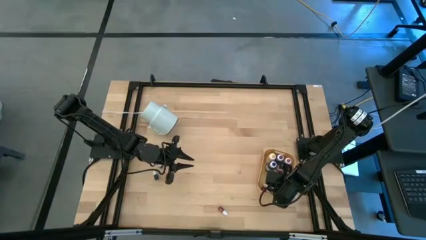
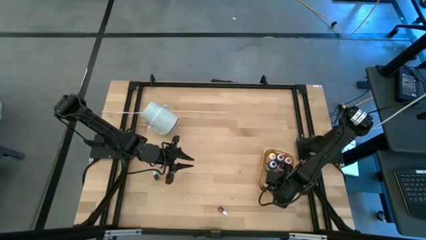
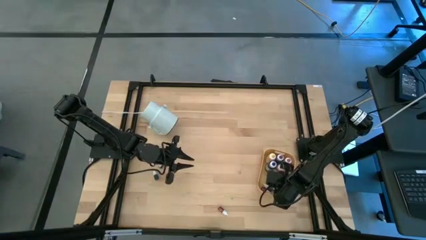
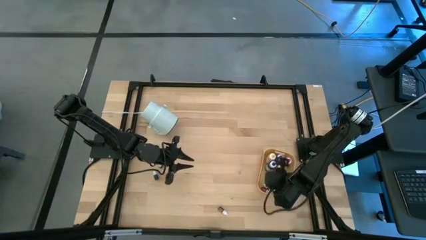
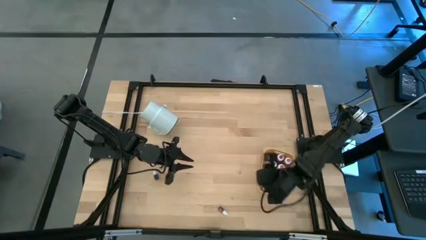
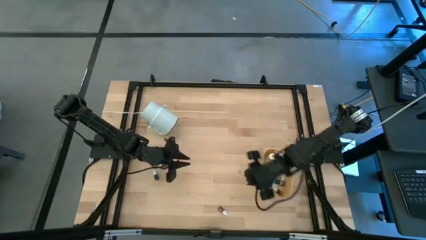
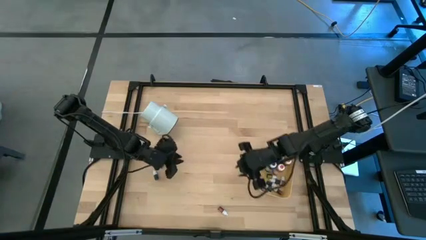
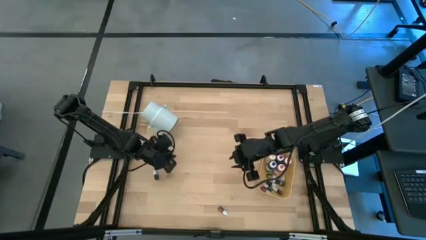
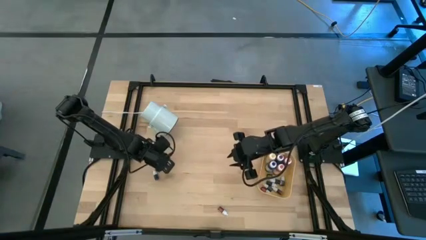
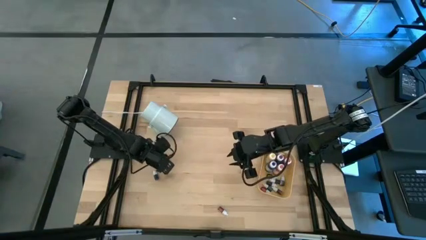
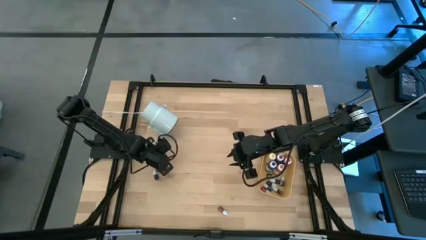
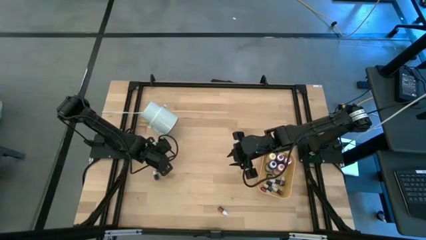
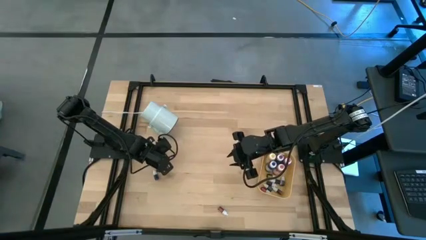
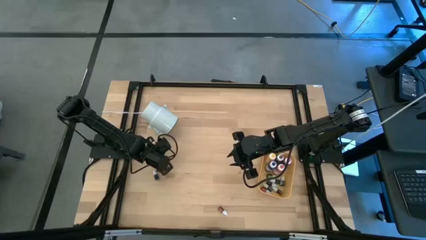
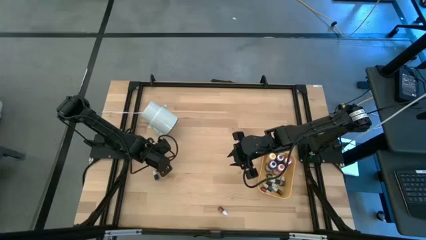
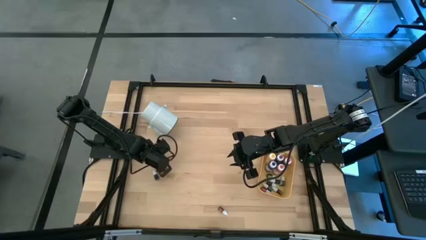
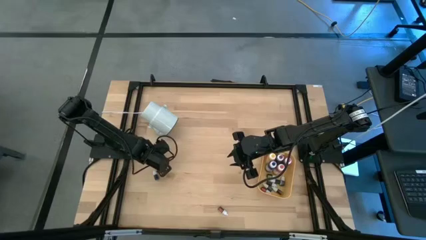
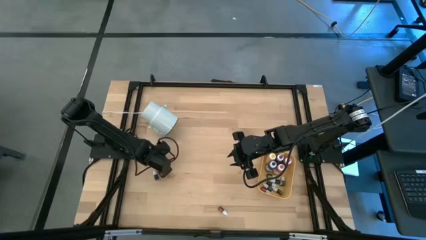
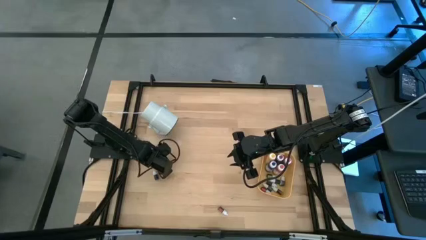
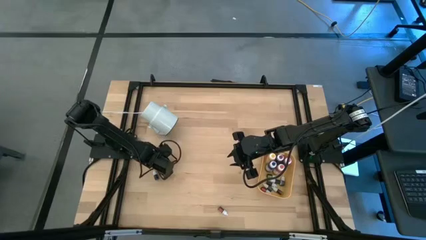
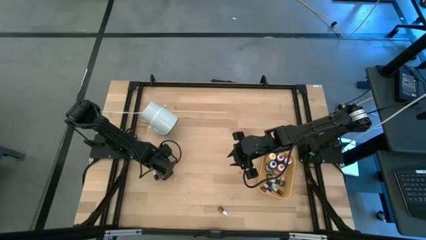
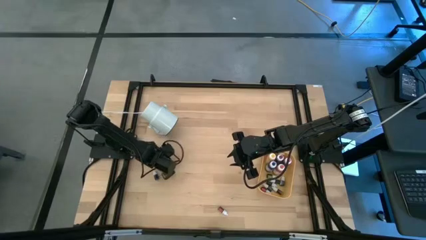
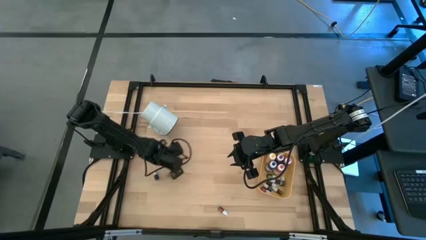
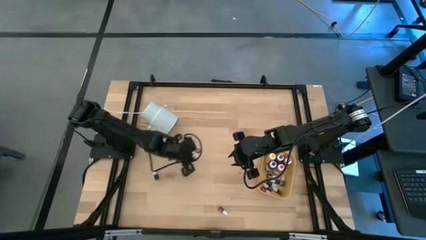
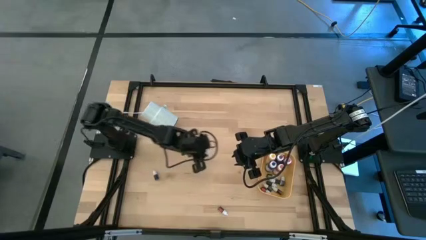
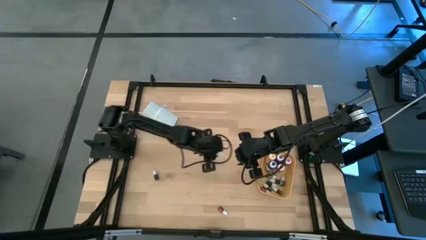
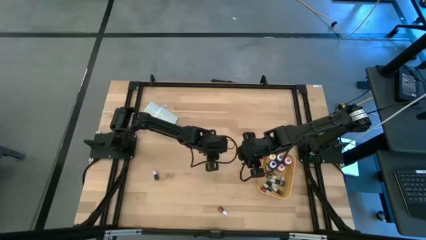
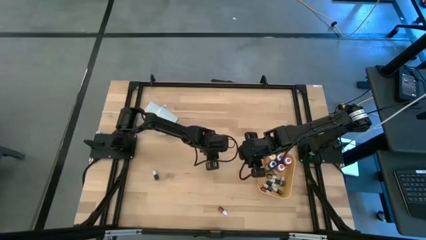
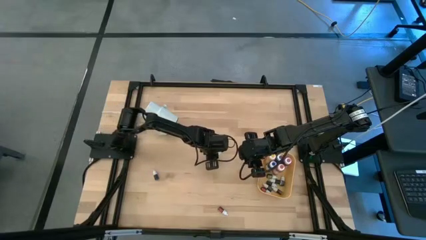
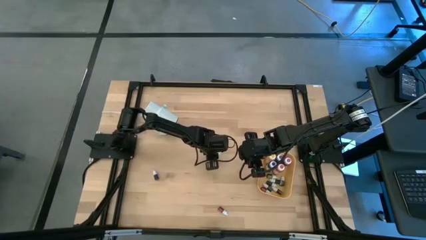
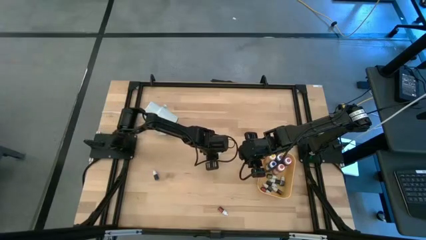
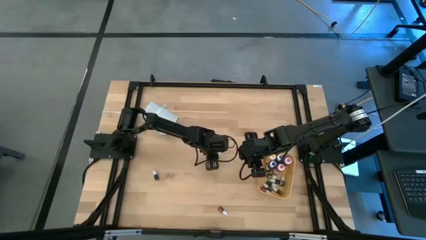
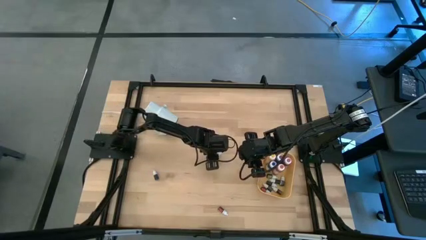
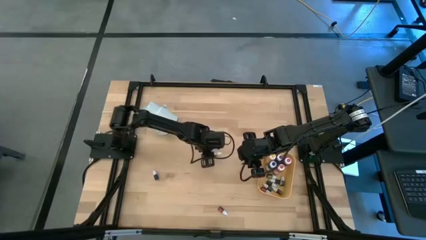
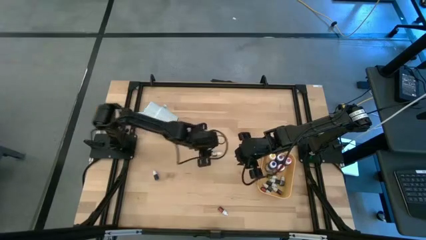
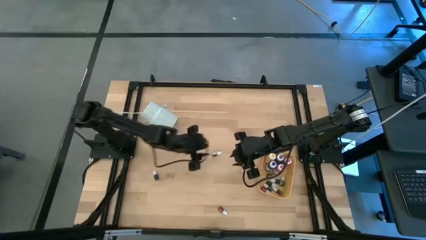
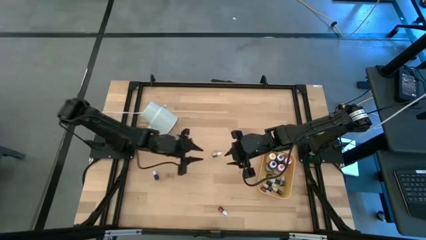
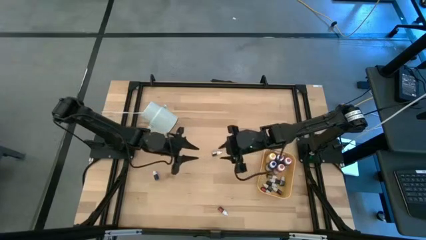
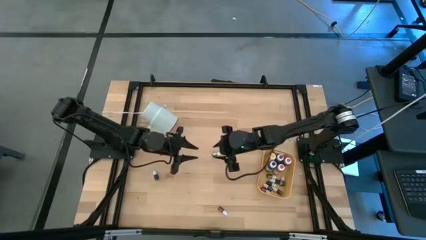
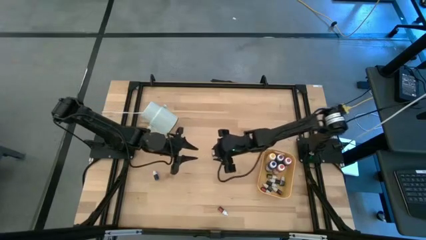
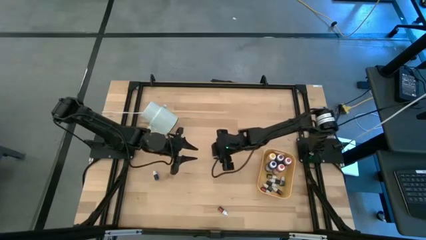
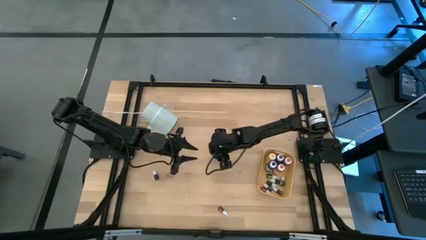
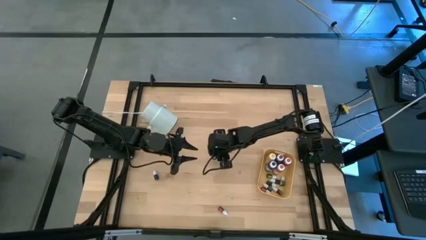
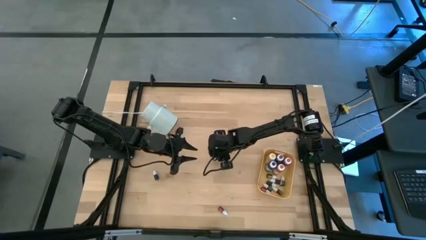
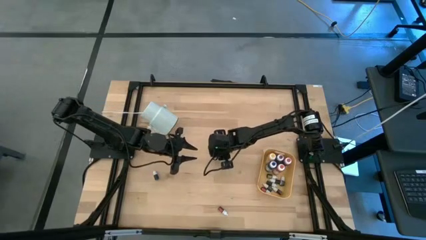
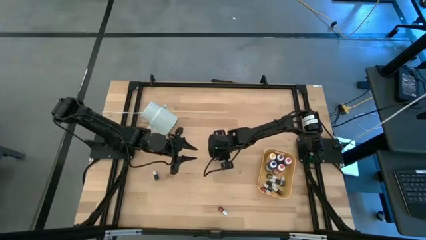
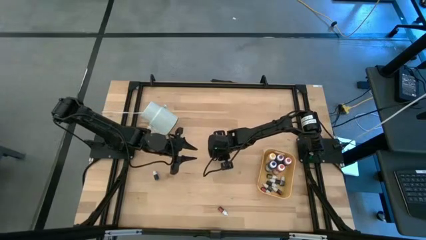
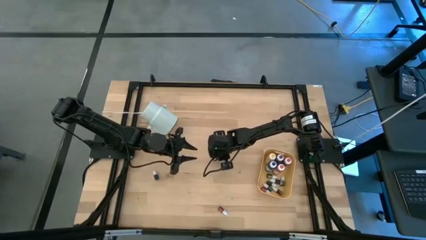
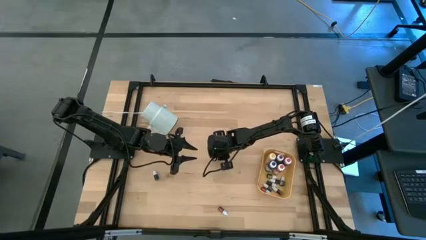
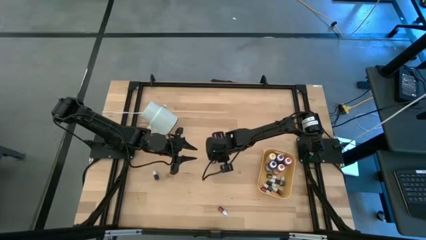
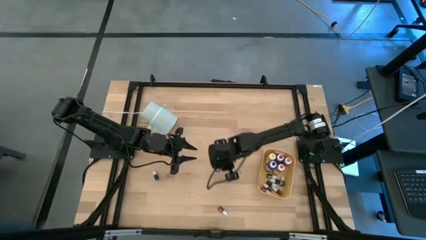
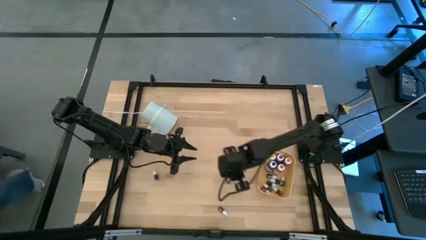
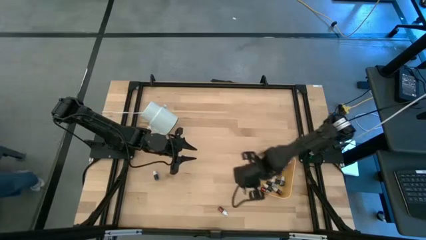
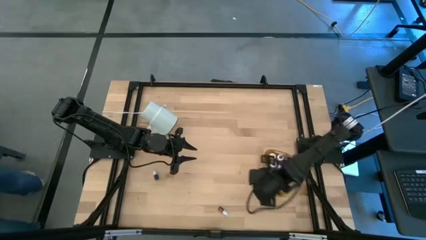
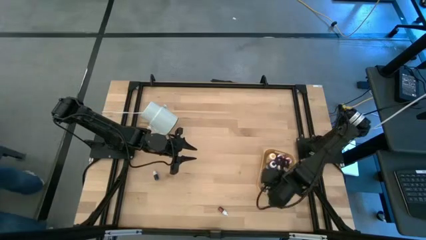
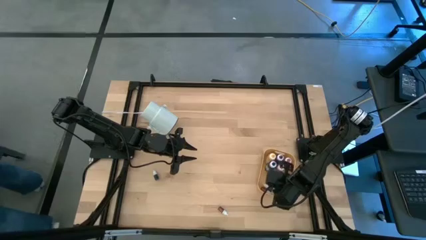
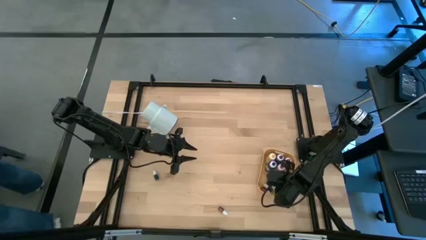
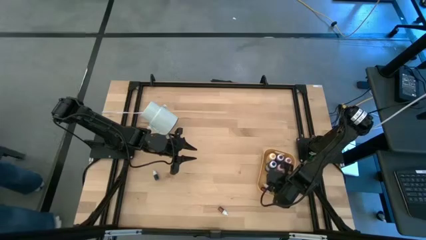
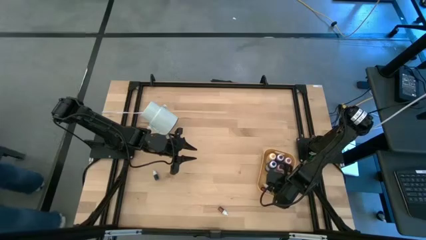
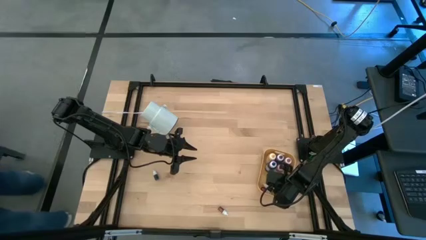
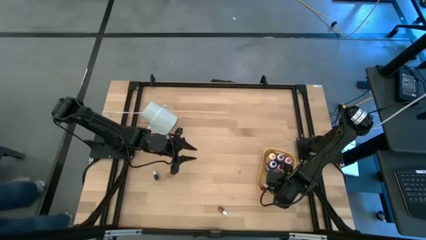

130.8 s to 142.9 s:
Task: Pick & Place food coloring
Put the top small black food coloring bottle into the yellow bin

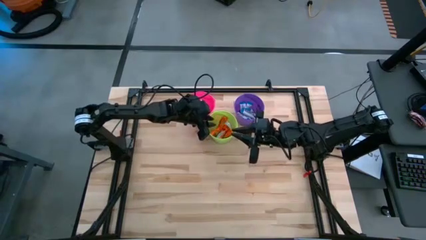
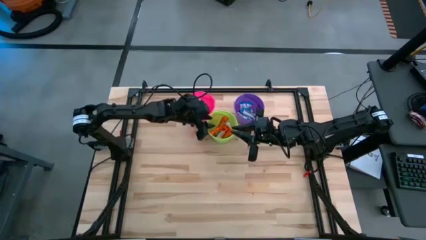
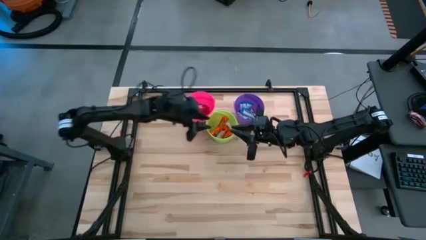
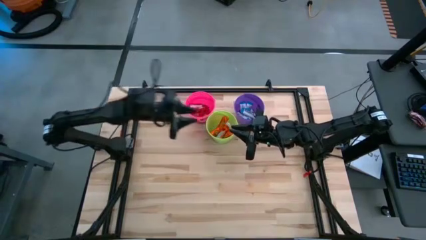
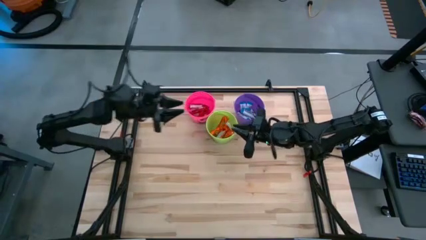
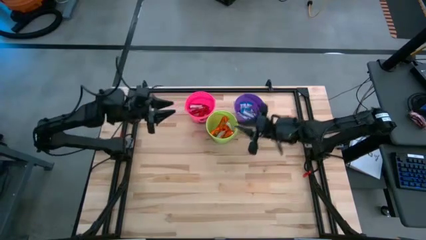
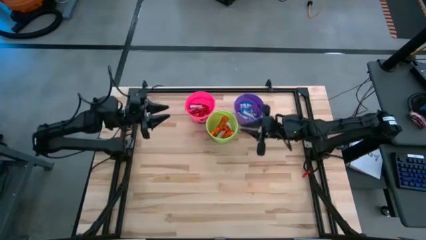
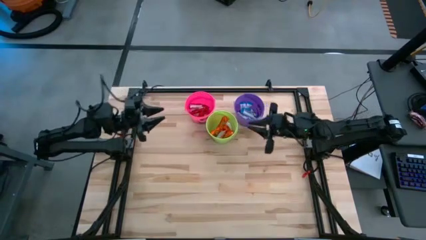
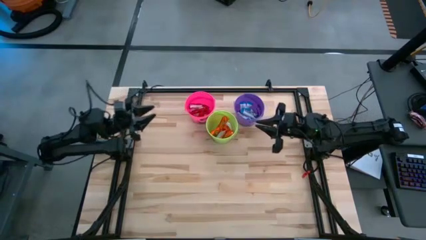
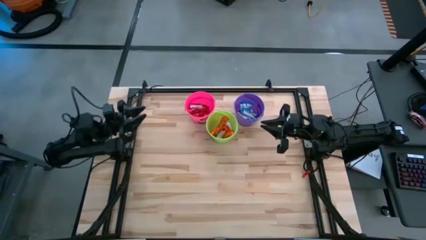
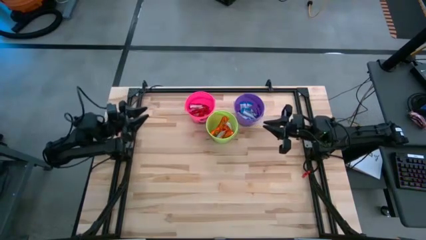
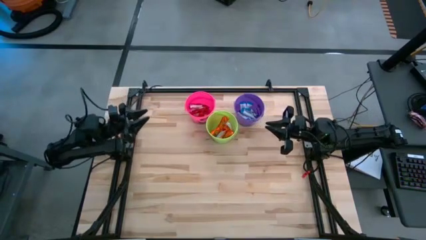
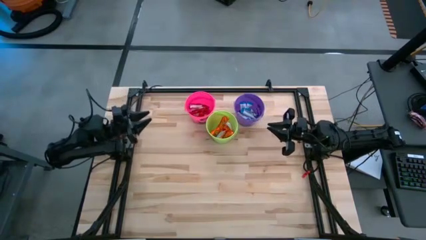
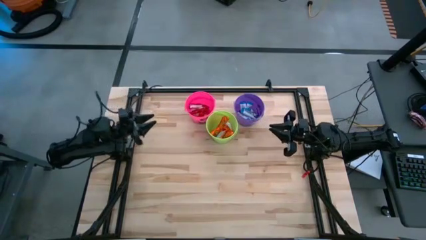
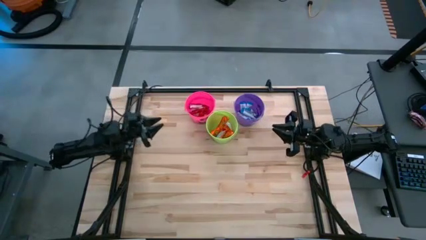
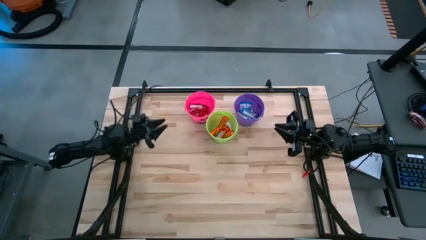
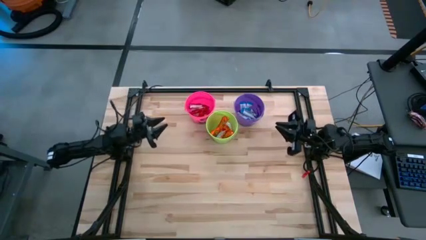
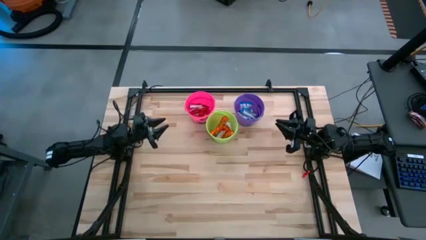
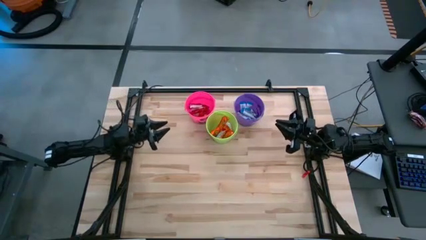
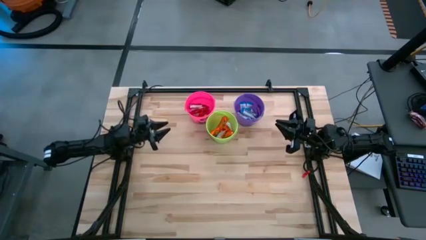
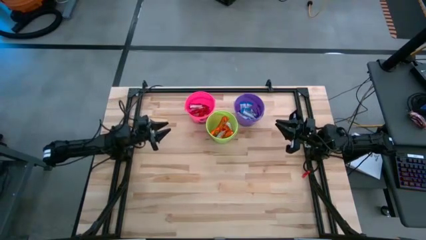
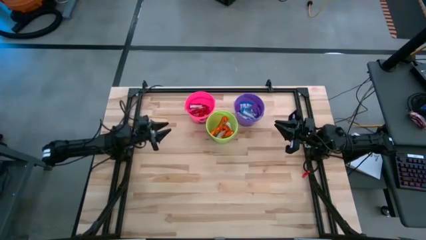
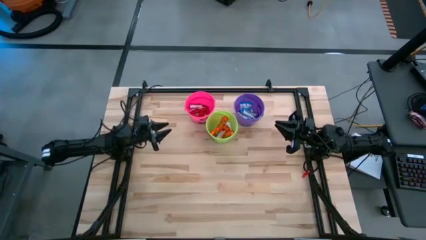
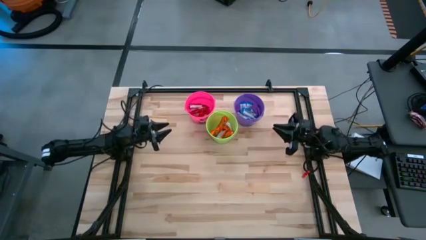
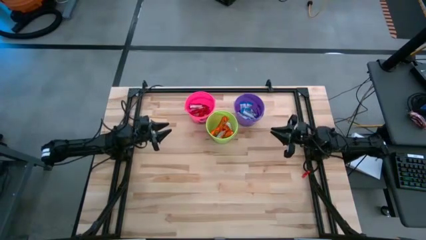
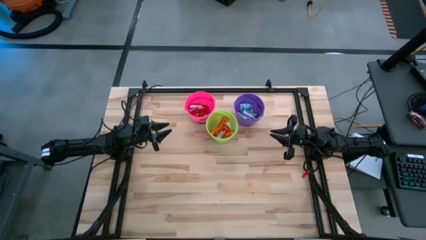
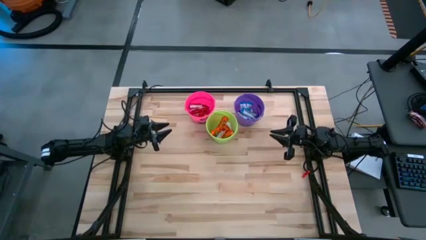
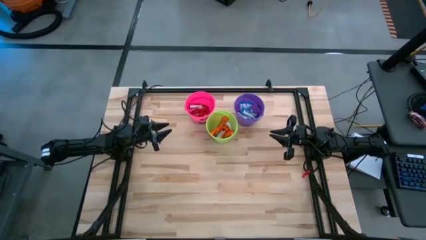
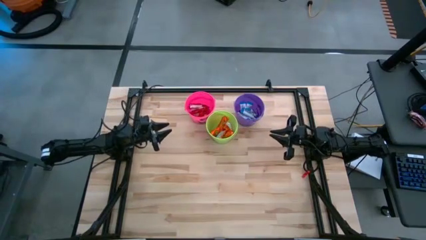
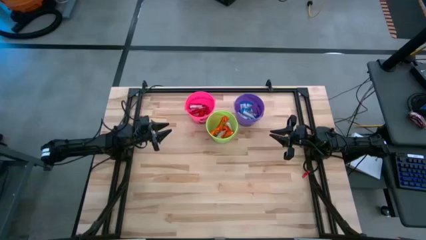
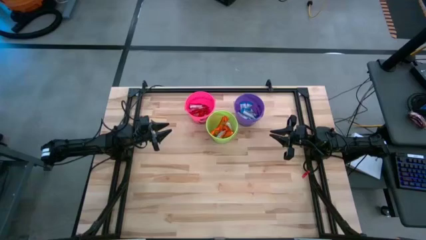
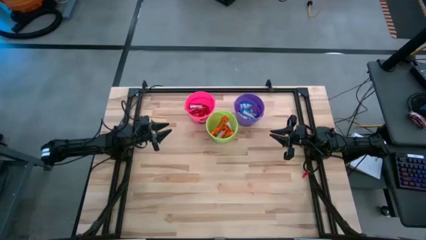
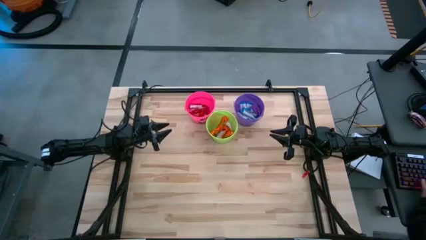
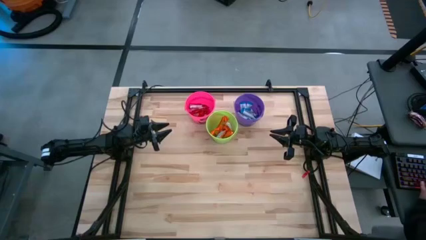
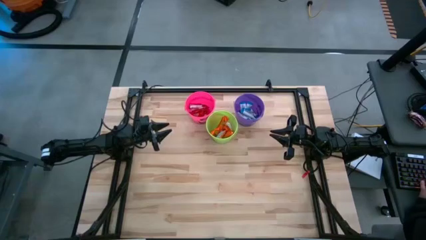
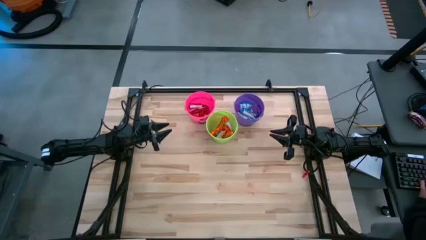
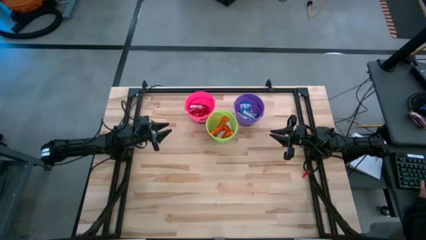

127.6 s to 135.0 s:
Task: Sort candy
Return to Home Position
